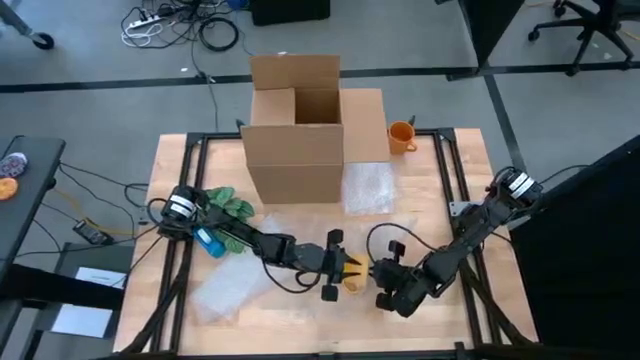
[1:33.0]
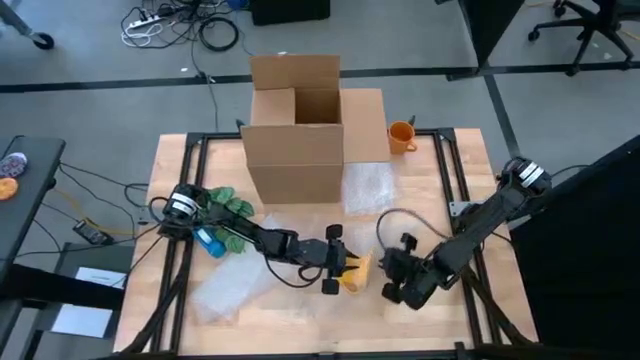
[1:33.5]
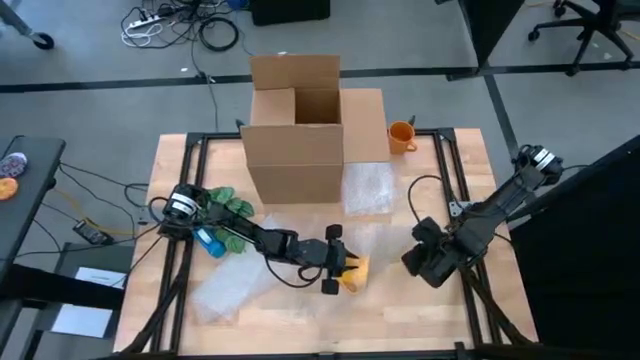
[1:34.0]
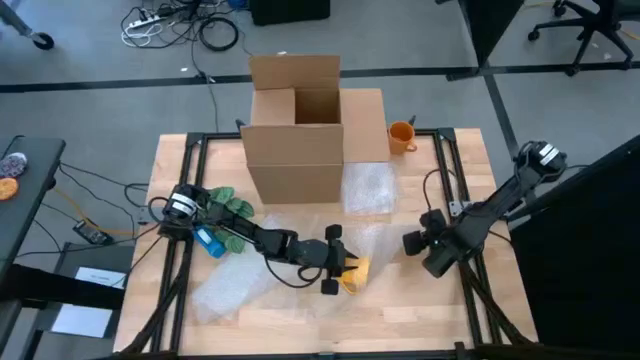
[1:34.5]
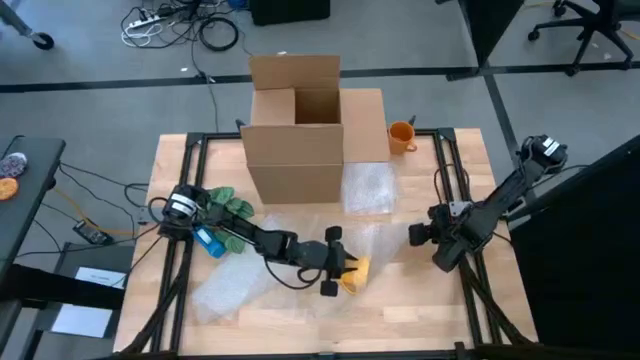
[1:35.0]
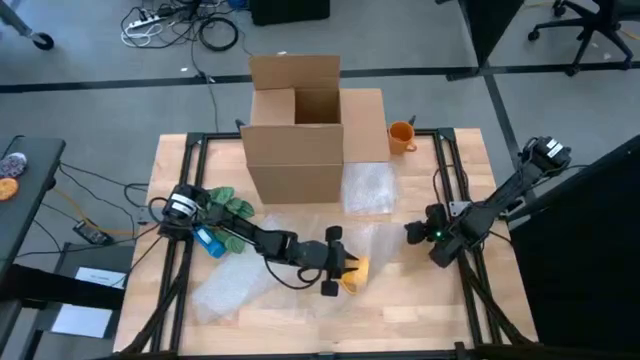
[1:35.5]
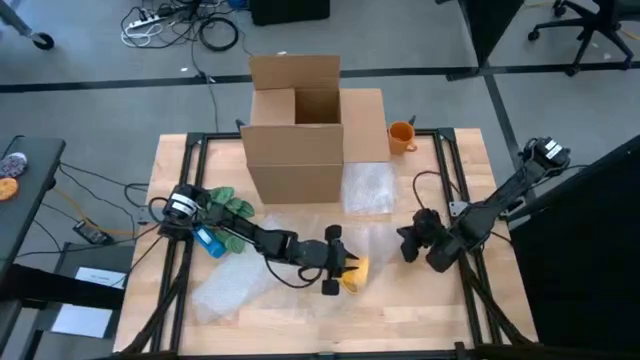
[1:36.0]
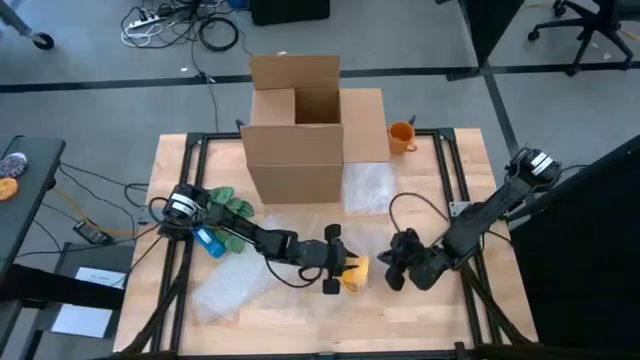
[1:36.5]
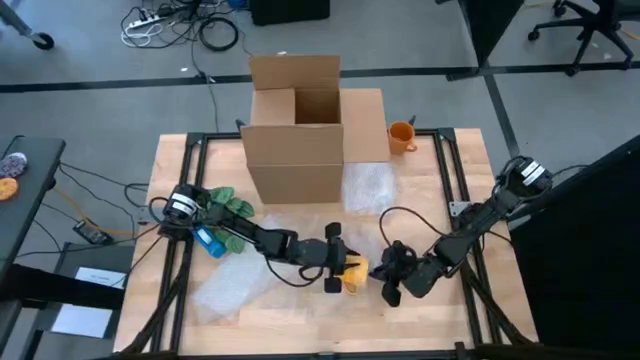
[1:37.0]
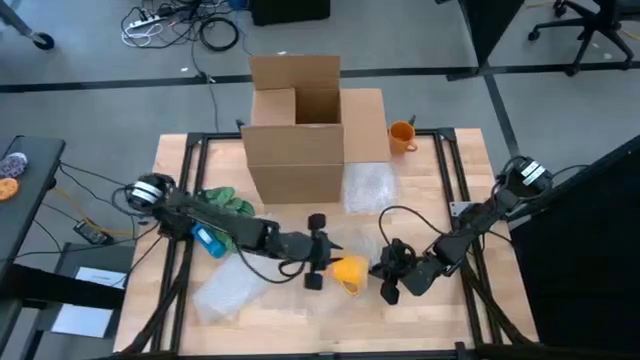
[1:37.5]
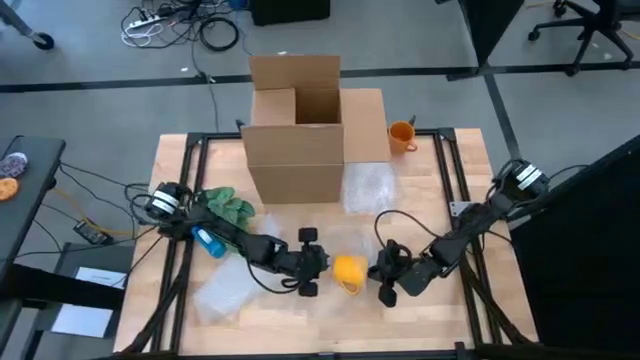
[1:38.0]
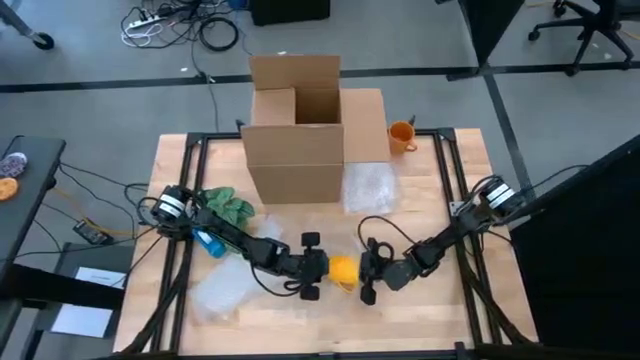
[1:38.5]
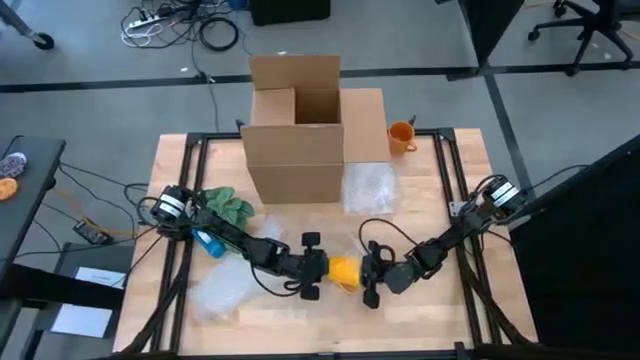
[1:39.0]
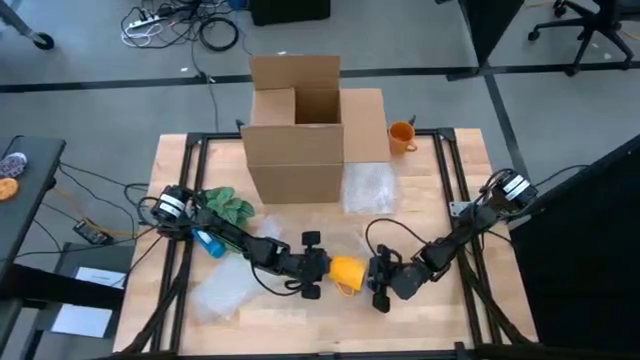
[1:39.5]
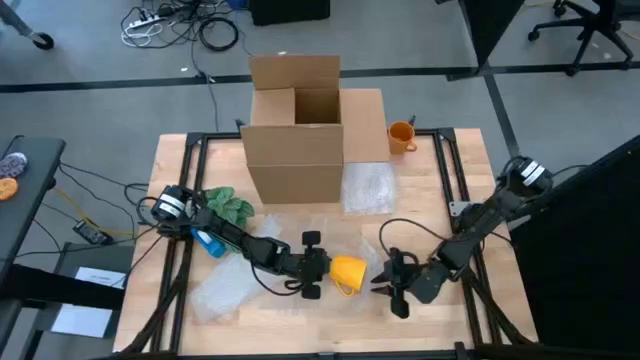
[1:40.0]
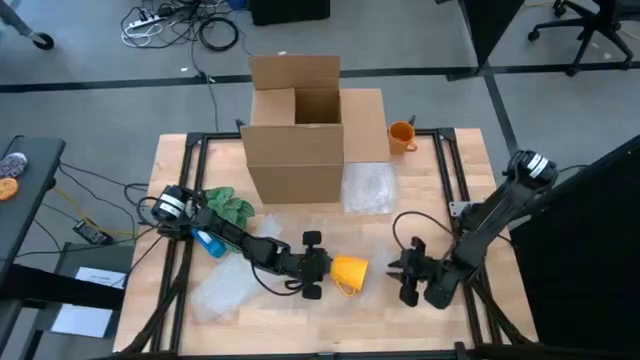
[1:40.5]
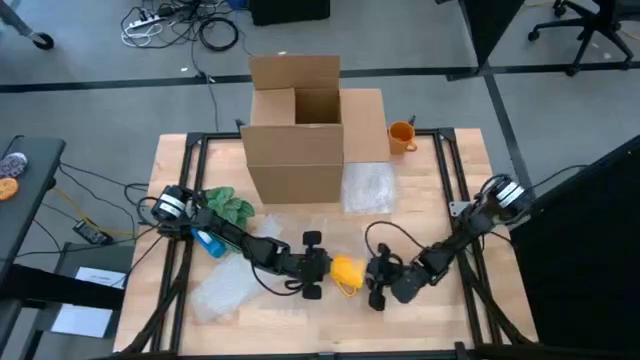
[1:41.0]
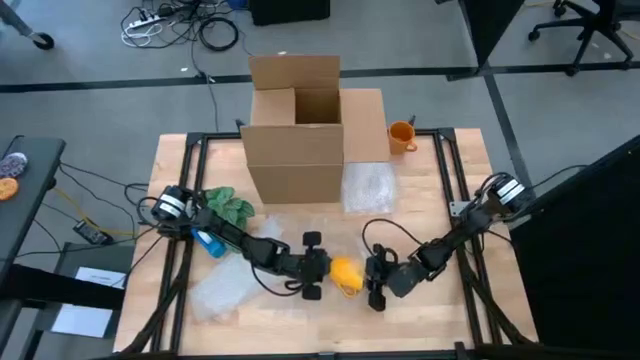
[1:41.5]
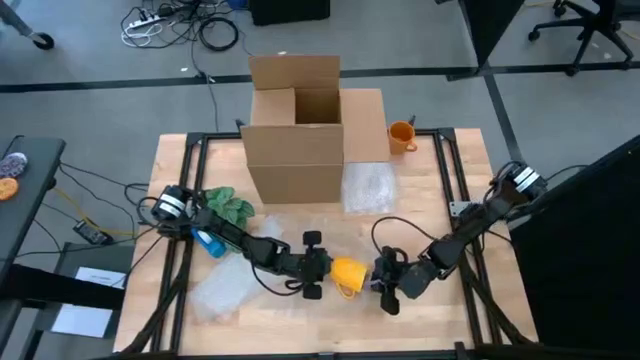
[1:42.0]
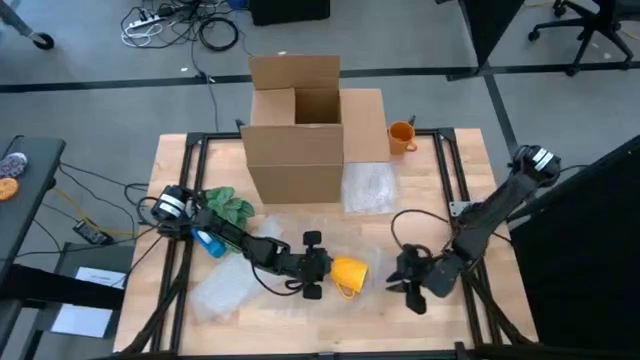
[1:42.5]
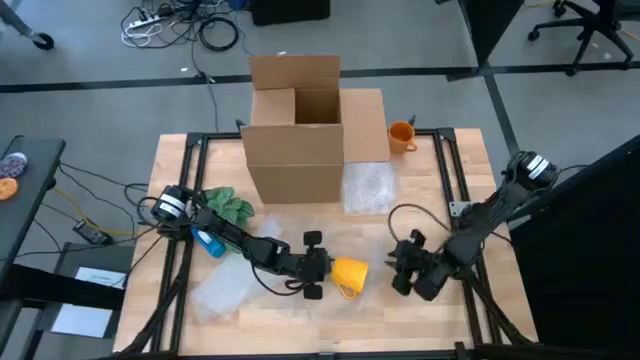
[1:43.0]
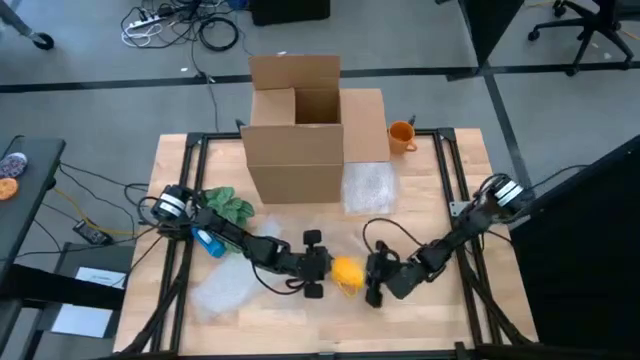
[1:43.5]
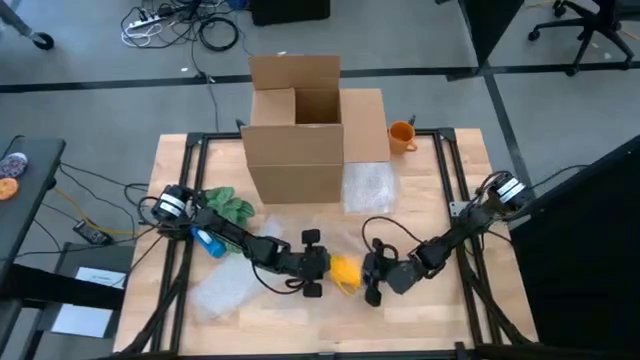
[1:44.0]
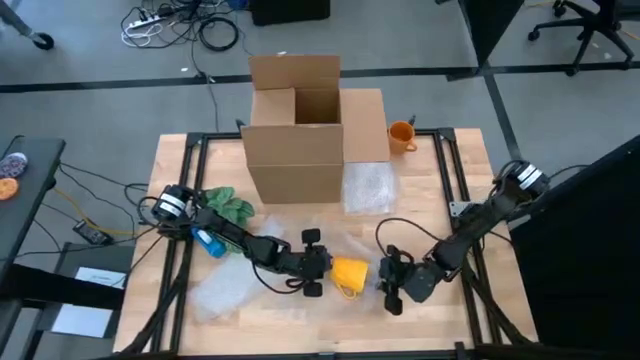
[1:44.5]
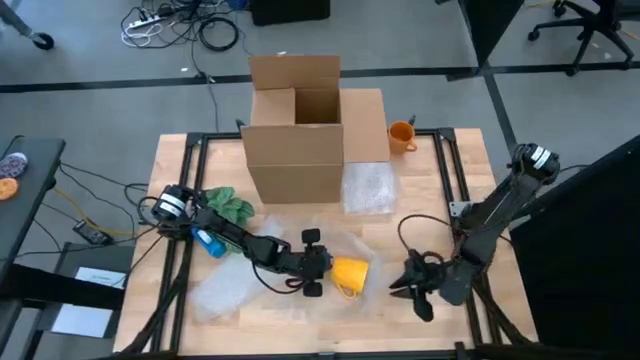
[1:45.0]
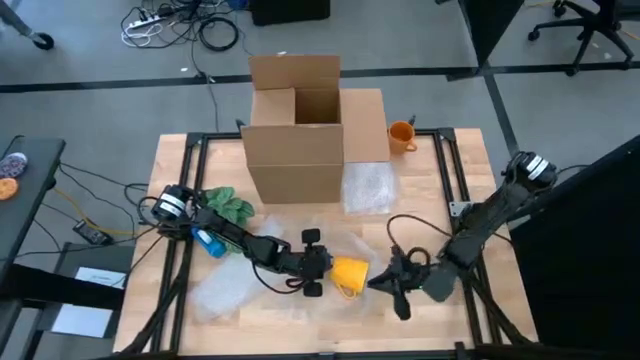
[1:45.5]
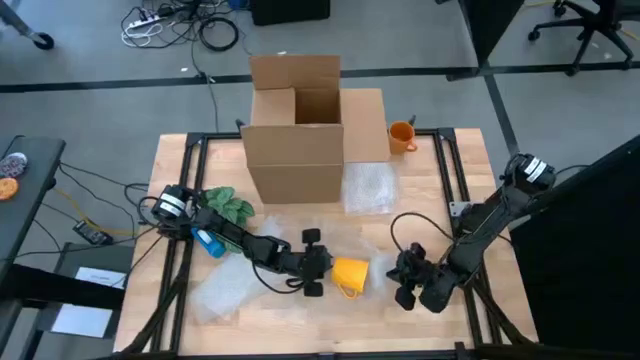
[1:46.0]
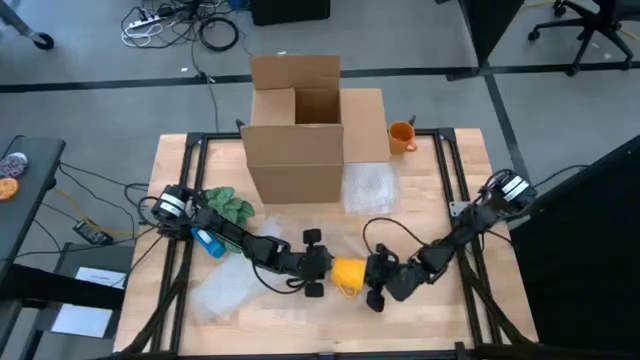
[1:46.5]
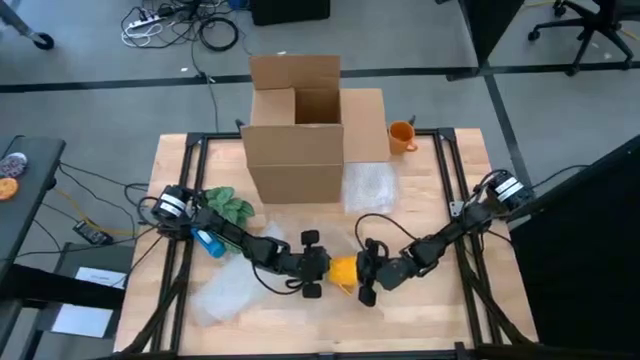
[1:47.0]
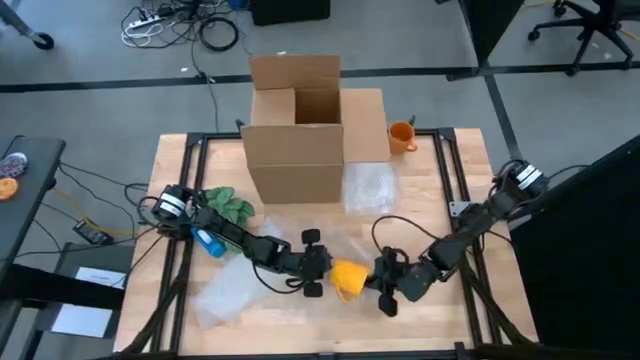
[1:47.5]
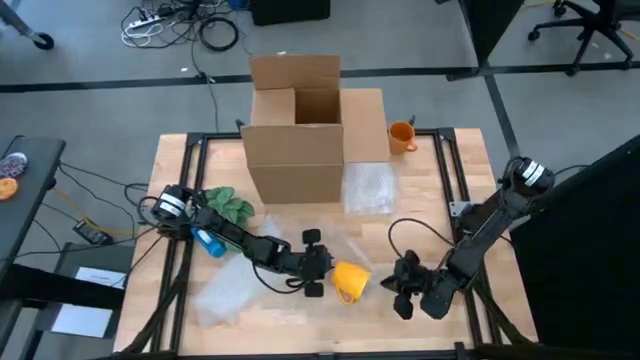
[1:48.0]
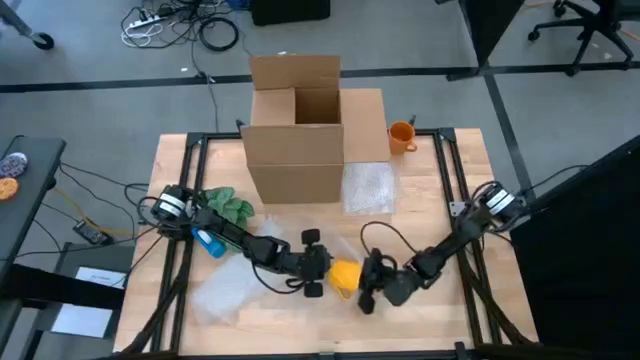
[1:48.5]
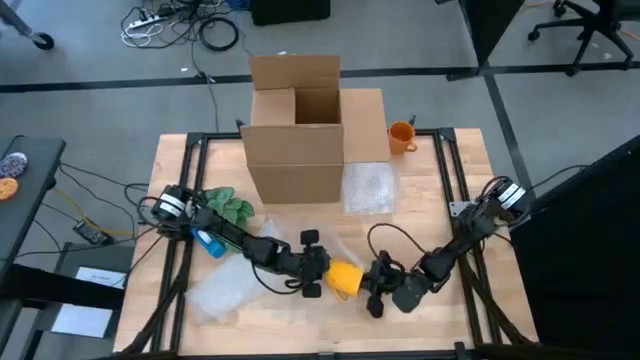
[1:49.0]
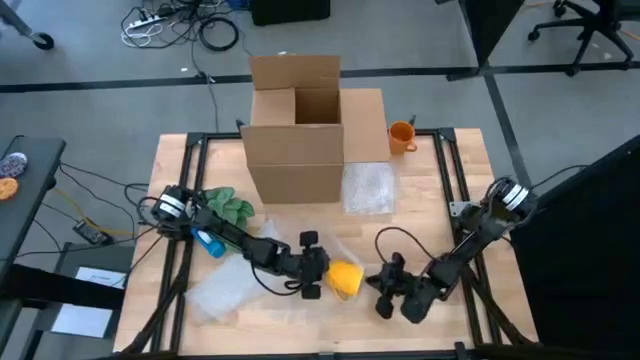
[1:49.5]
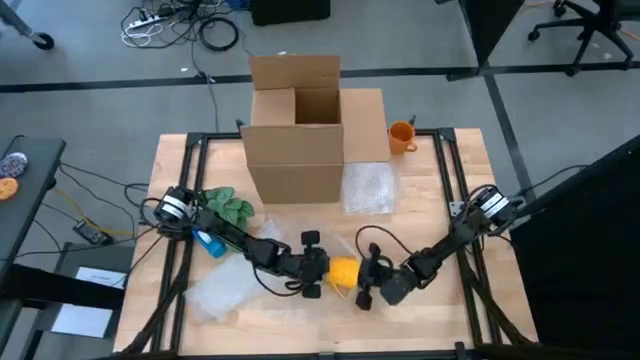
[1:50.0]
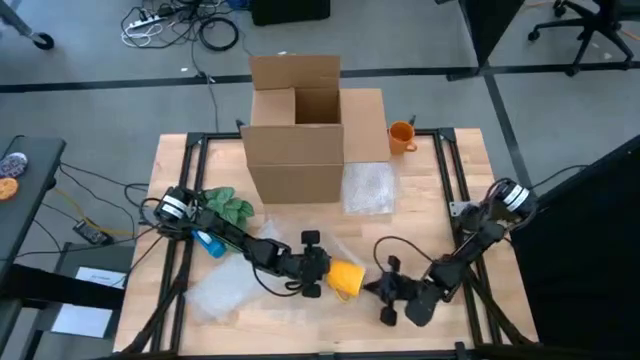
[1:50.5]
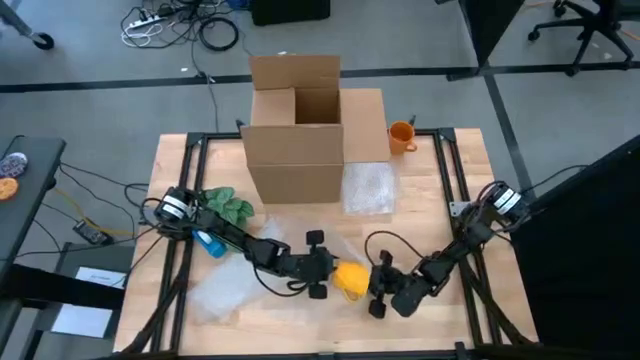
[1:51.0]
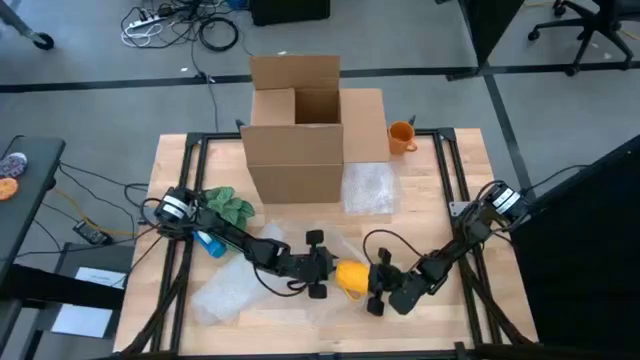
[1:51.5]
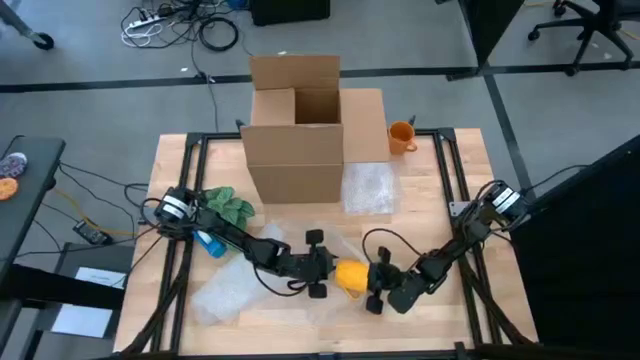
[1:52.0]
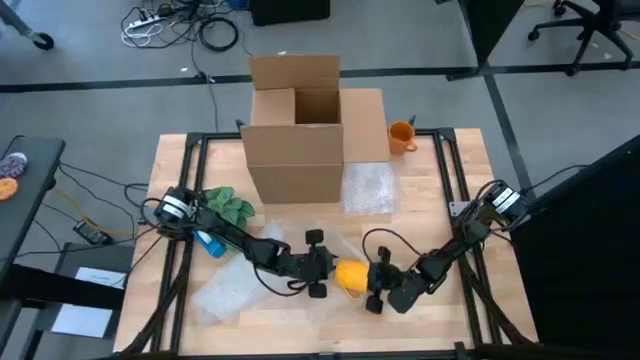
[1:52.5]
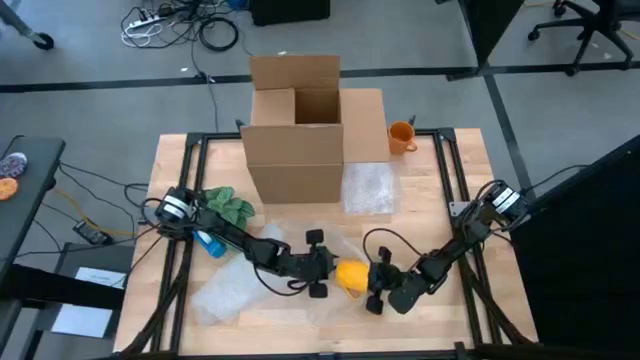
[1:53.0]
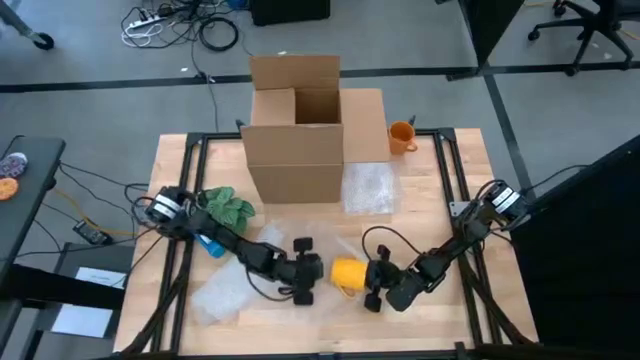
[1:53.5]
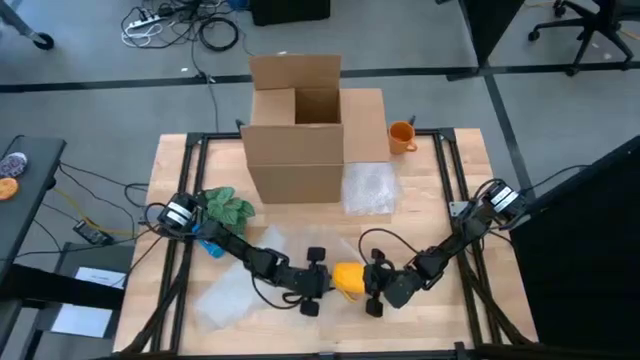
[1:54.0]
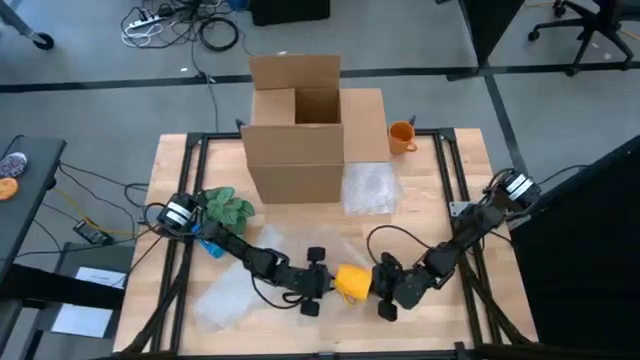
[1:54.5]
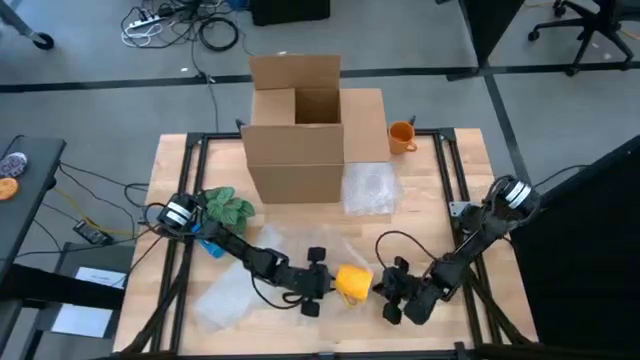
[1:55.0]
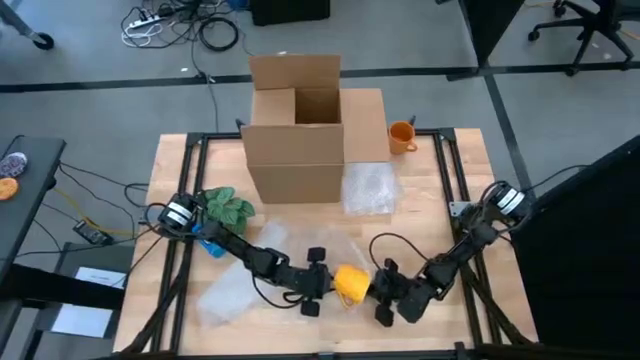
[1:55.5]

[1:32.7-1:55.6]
Task: wrap mug
Wrap the yellow mug with the bubble wrap
